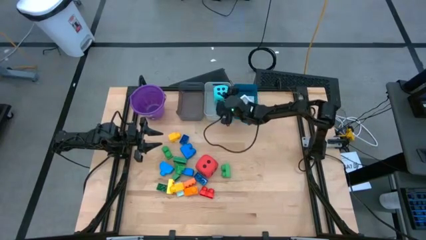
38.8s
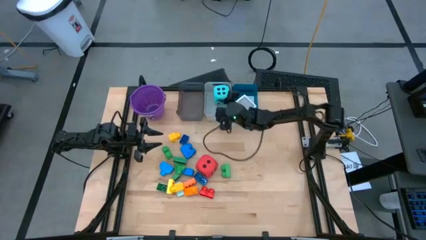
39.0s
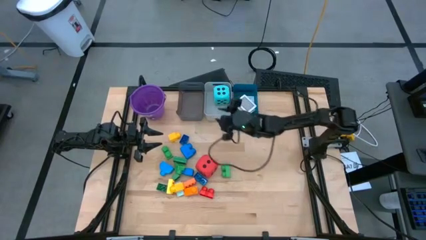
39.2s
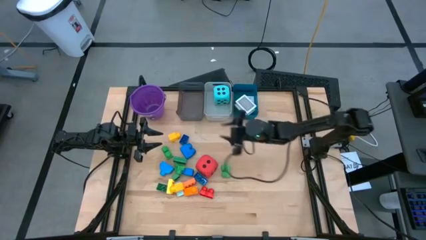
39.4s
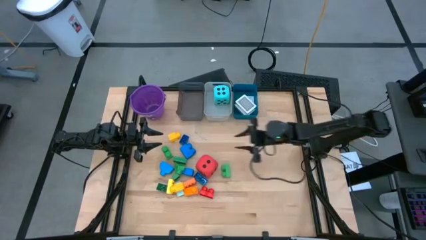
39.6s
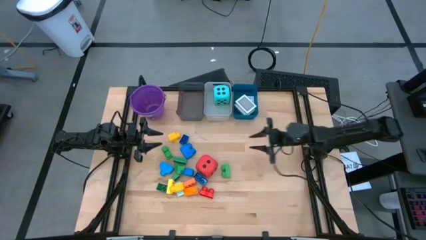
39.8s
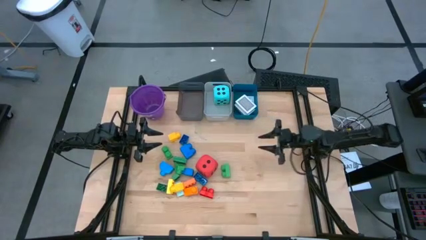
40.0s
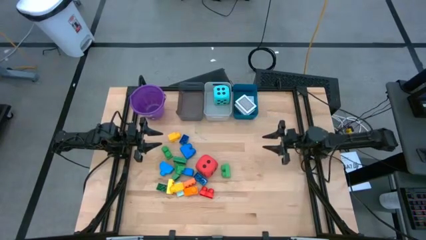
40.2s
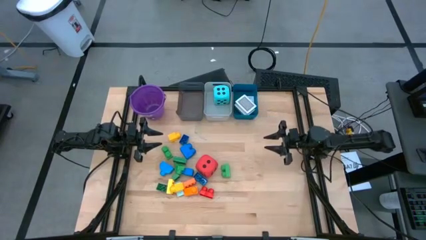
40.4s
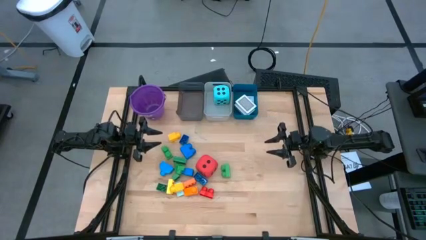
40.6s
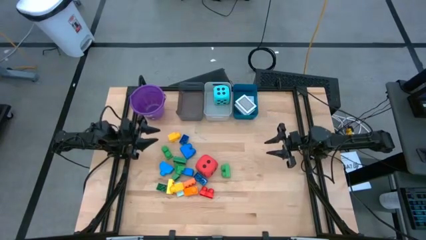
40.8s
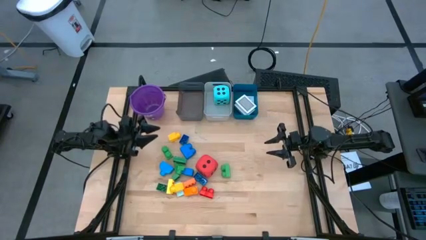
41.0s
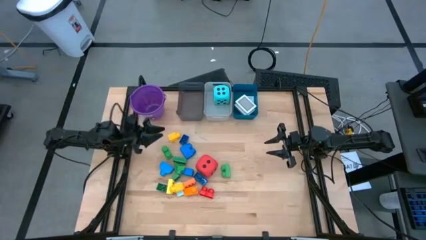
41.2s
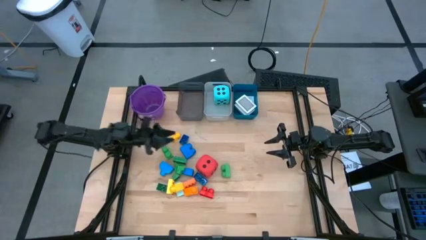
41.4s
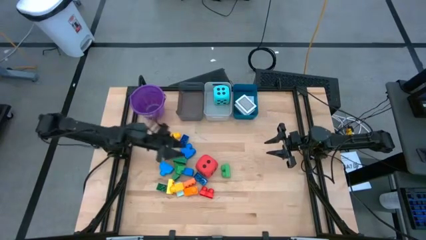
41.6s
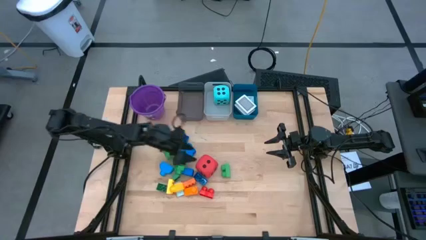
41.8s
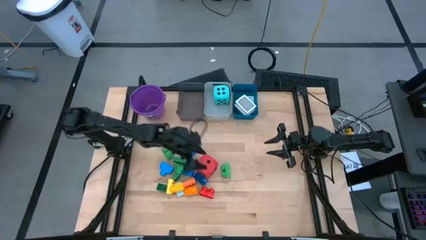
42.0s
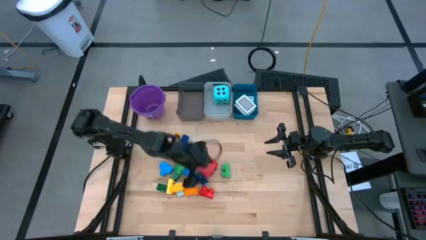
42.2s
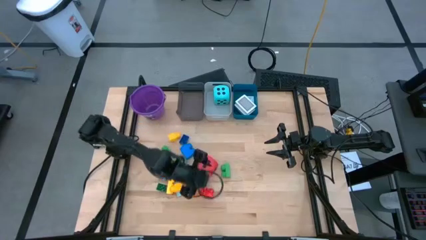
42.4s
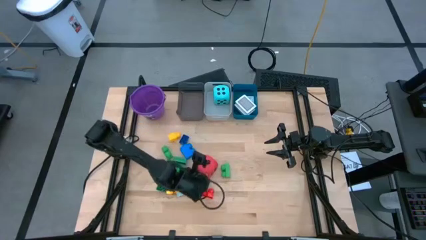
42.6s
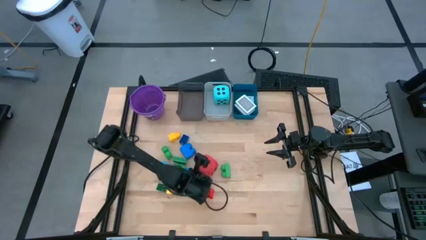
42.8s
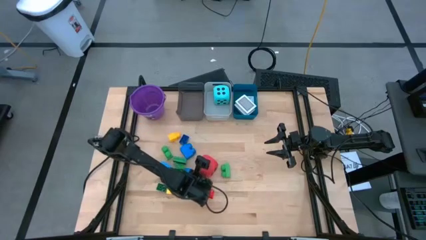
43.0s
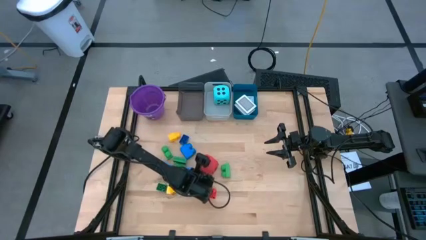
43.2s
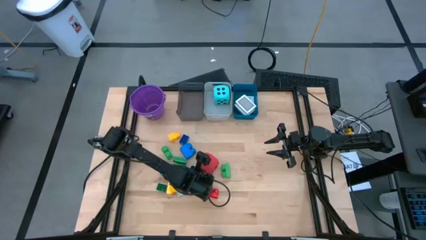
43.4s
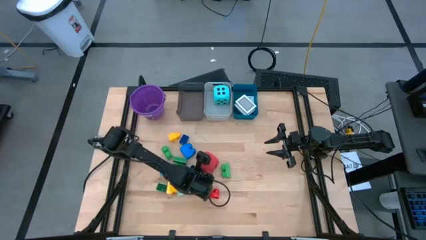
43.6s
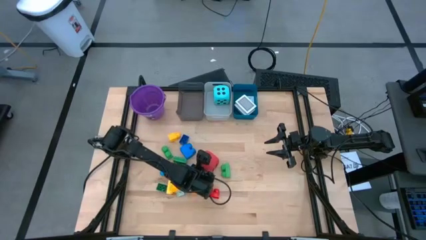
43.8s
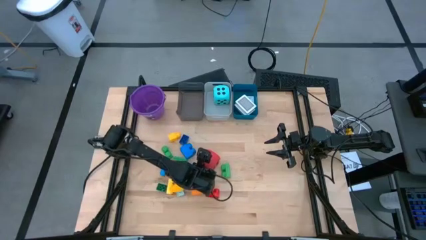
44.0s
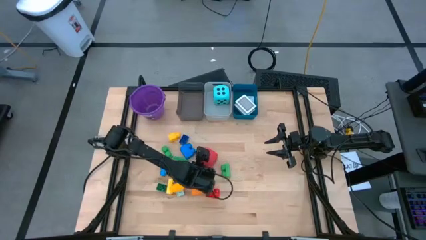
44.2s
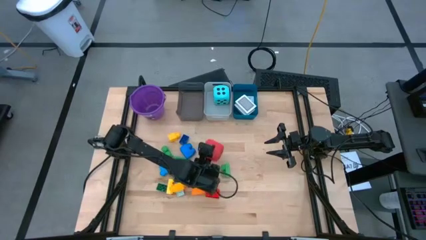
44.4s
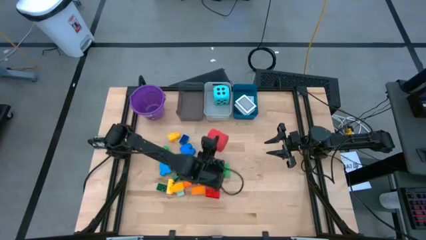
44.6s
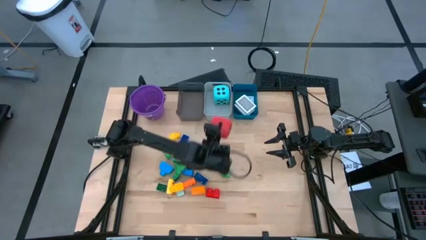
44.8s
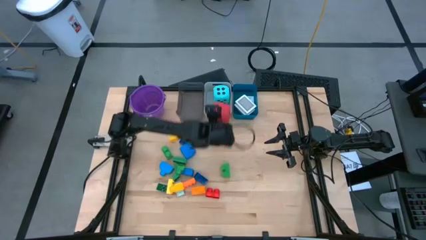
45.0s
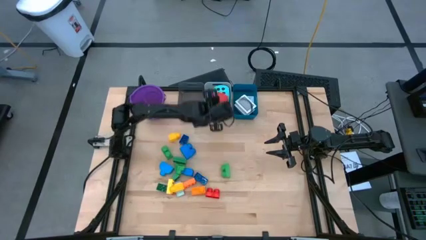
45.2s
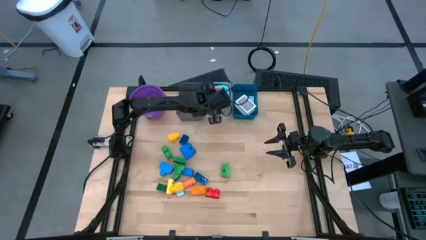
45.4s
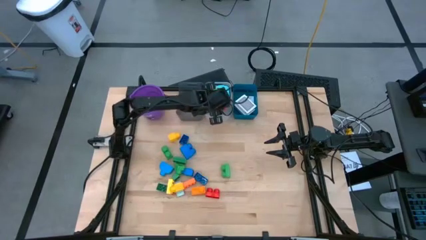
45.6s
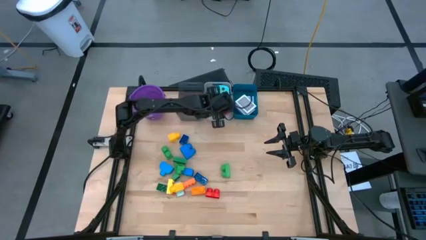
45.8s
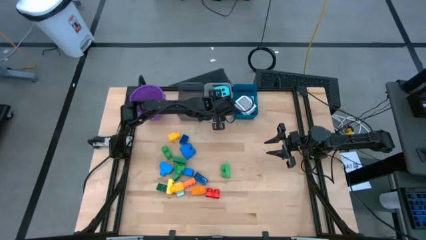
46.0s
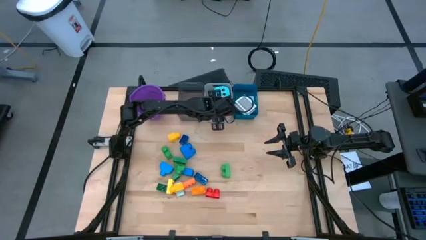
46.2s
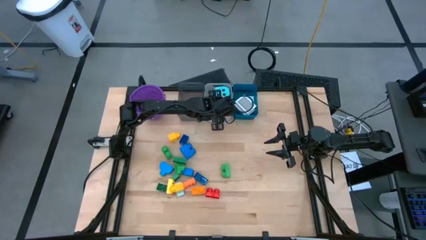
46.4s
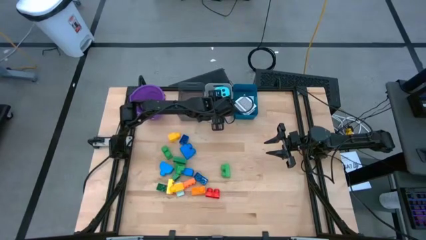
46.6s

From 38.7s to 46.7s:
Task: Pick & Place Toys
Put the red dice into the gray bin

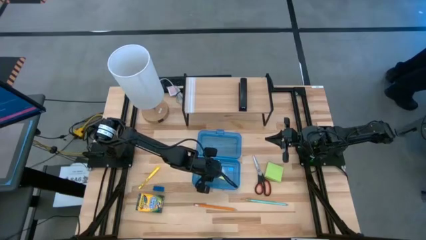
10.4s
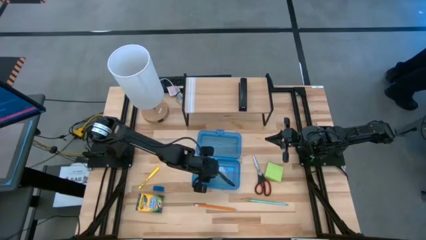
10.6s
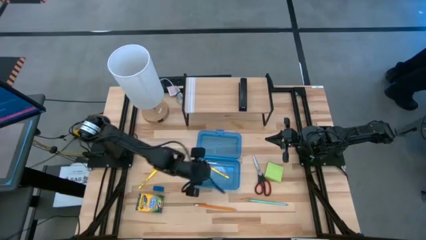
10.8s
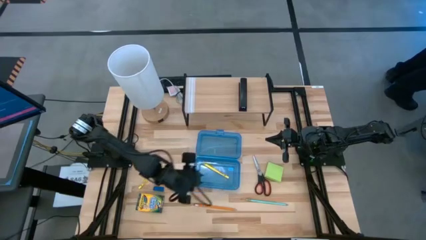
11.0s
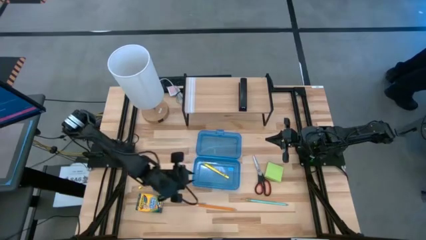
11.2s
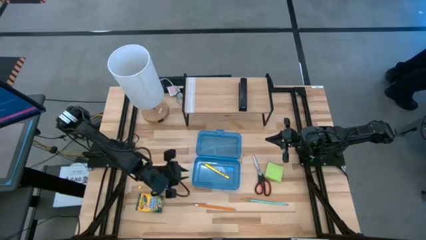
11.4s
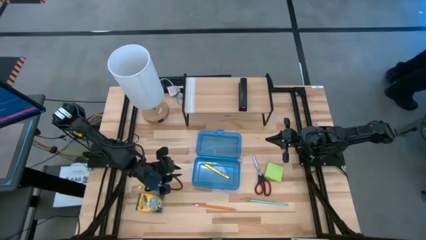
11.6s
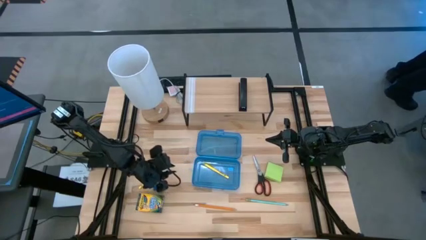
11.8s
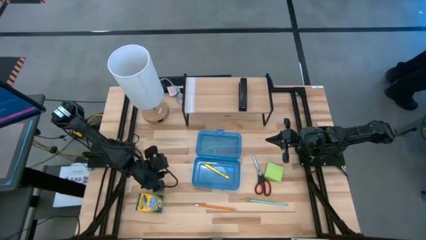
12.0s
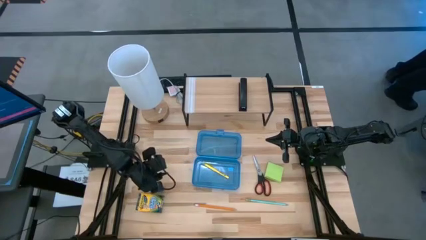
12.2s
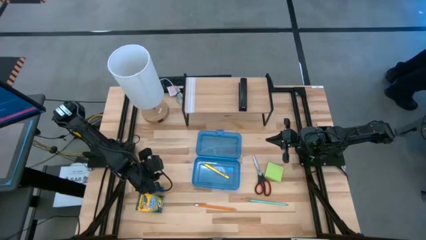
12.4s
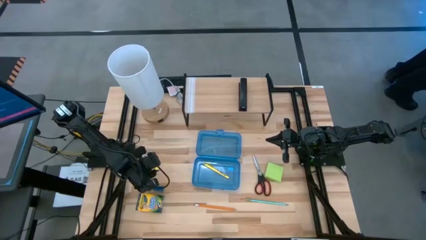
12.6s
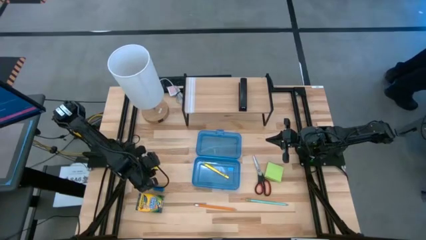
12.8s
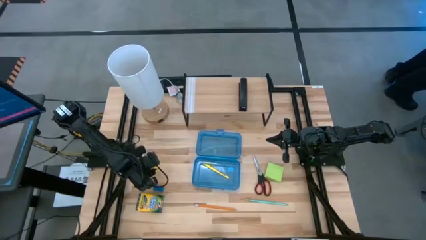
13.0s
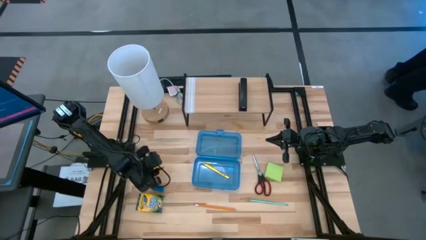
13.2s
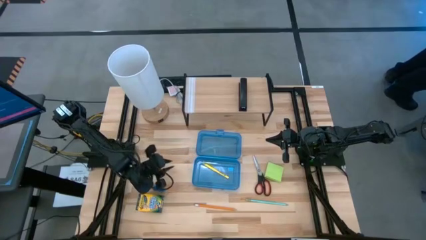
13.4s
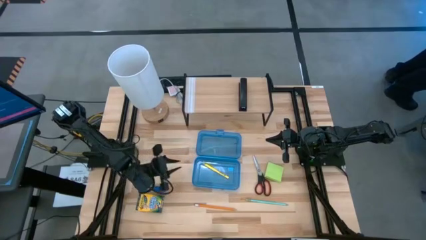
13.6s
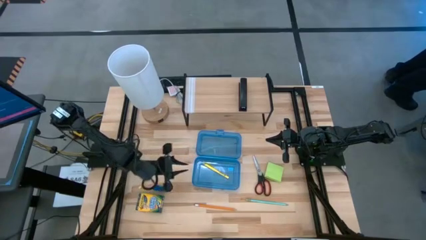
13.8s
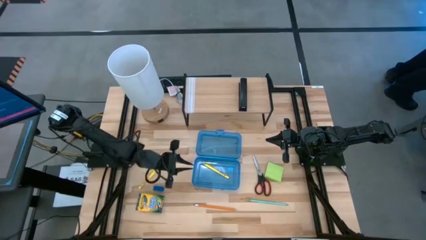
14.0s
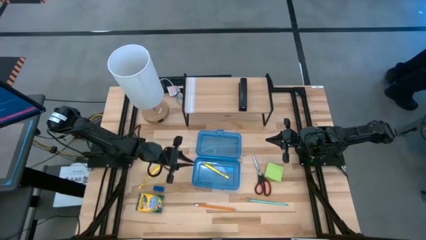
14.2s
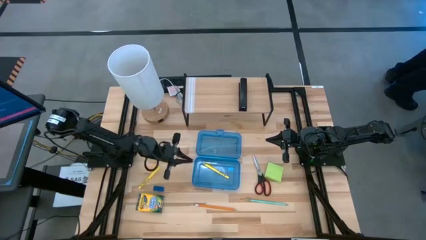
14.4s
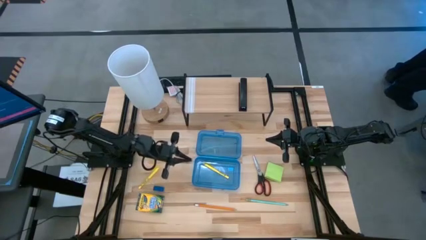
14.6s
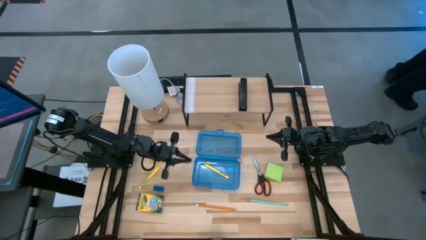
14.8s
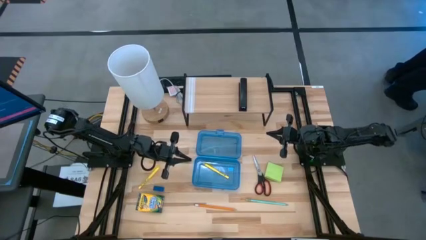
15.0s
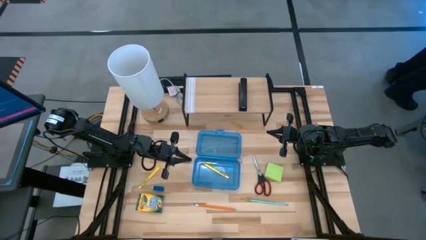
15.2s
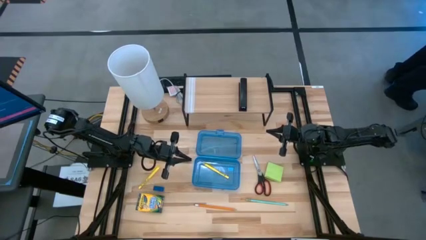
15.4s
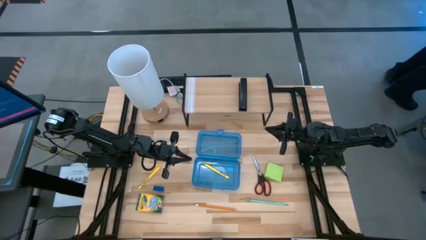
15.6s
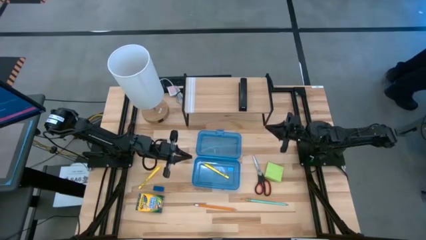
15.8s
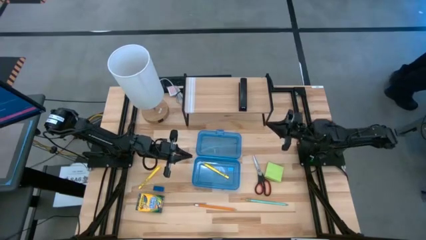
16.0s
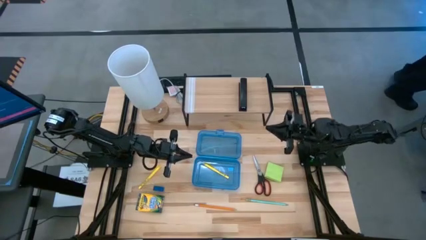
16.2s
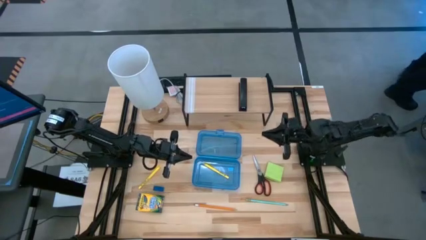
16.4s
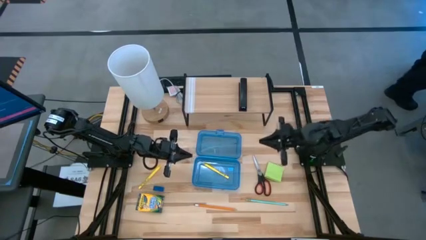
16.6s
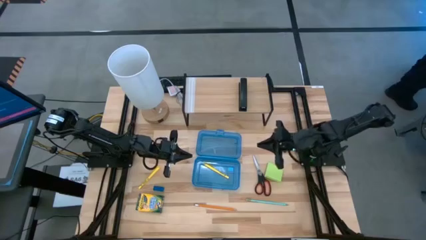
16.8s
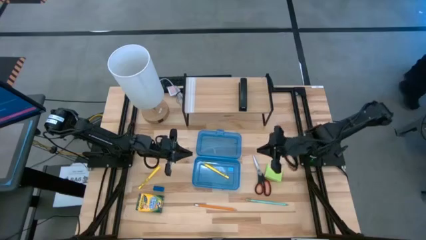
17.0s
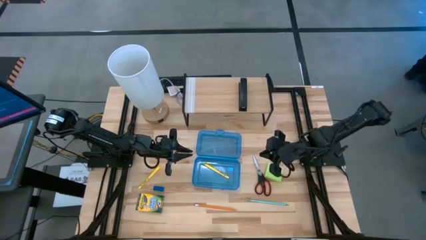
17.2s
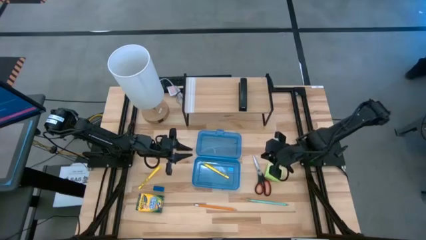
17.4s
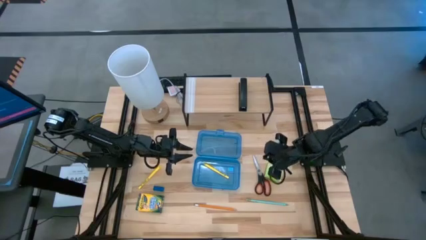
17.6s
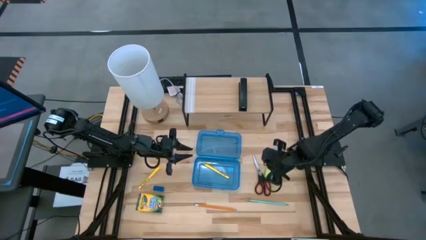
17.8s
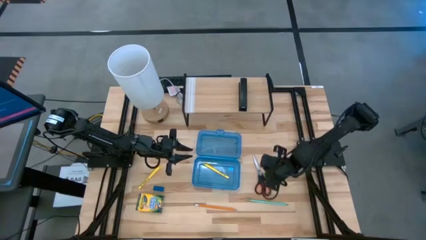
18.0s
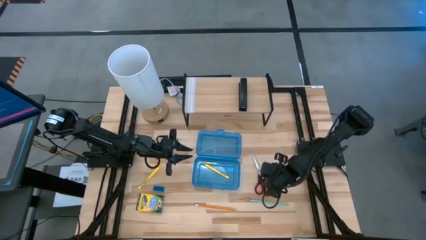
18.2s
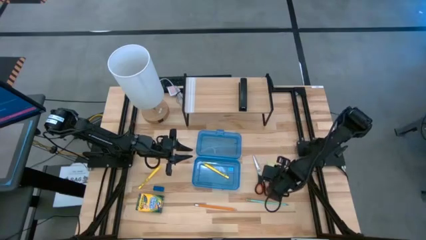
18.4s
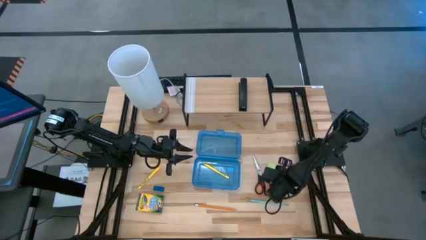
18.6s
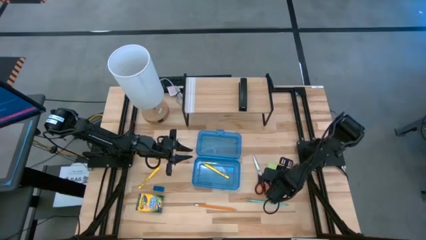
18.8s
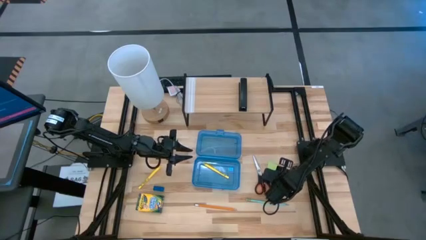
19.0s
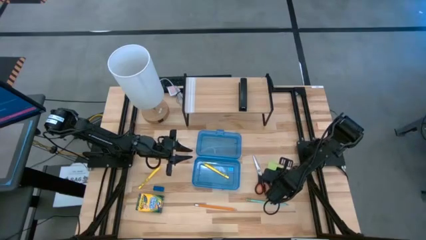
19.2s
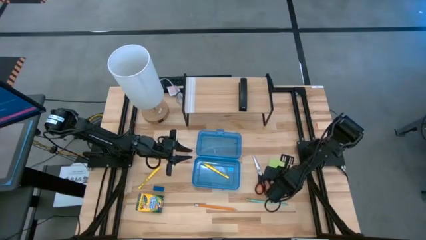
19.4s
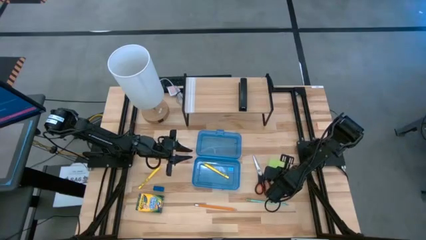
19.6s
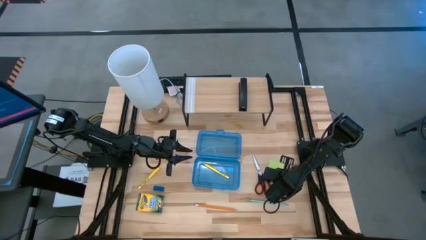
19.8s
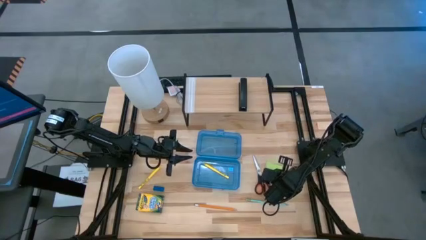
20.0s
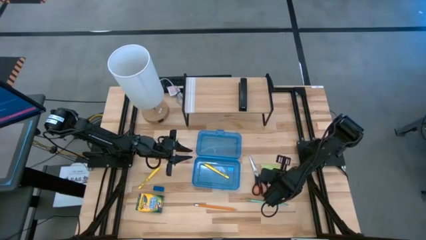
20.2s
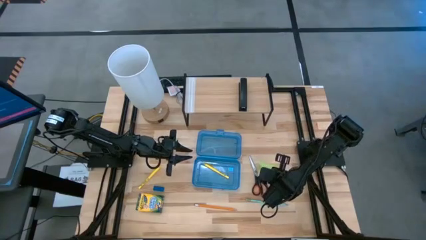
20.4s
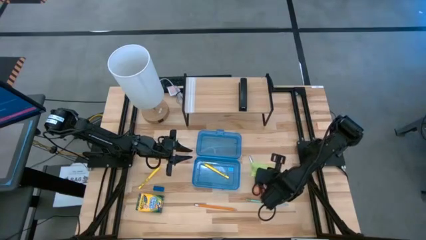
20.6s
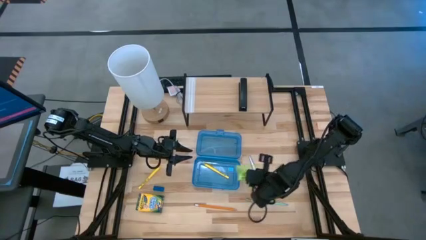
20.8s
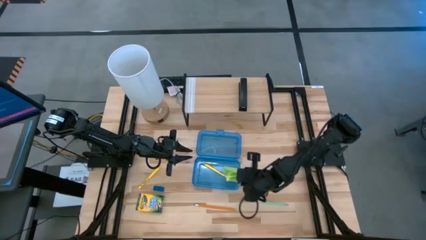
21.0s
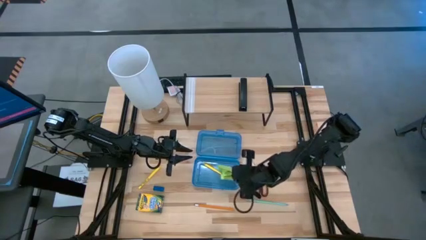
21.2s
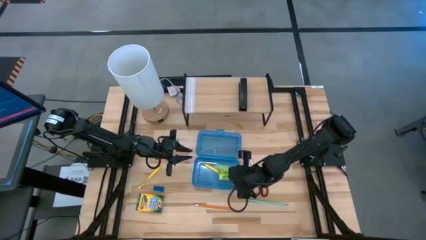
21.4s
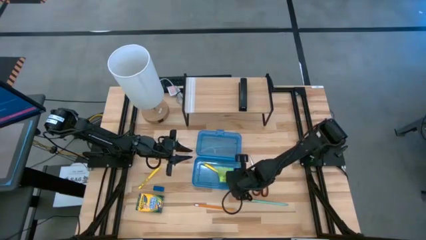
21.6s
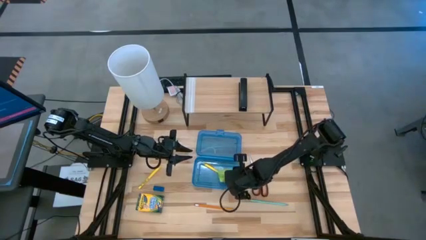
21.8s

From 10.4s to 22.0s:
Task: Pack school essentials
Put the green sticky note into the blue supply box
